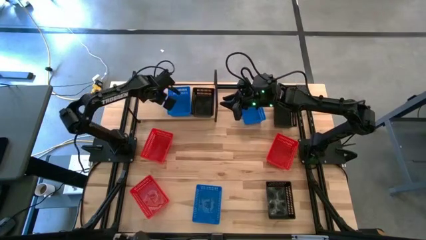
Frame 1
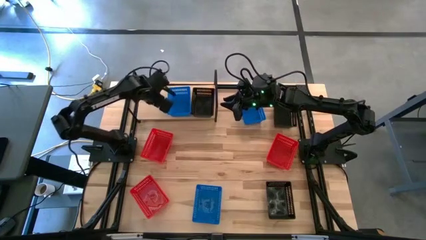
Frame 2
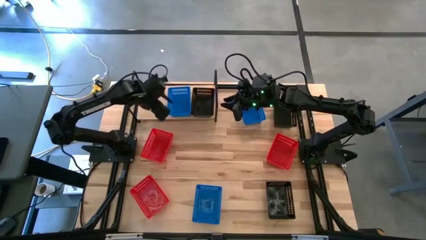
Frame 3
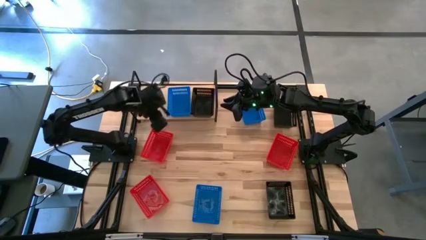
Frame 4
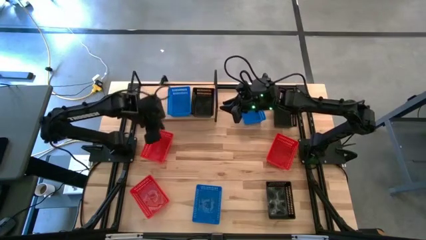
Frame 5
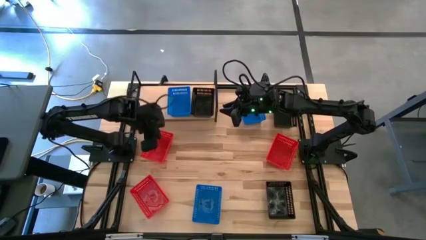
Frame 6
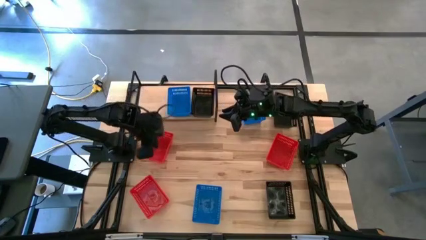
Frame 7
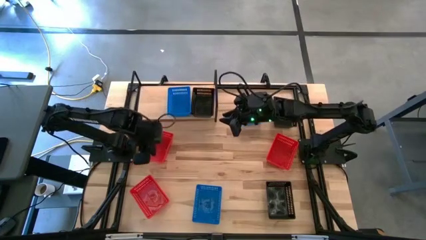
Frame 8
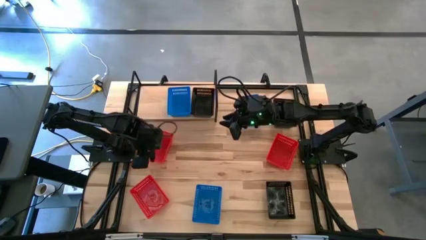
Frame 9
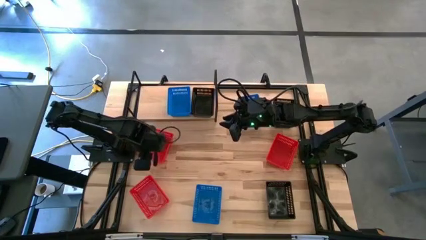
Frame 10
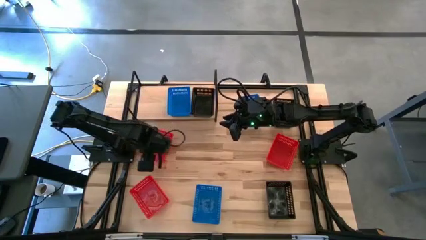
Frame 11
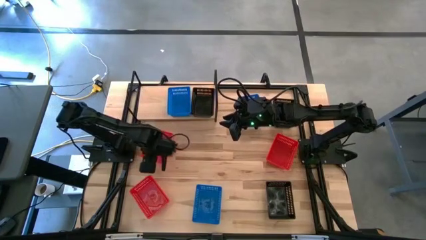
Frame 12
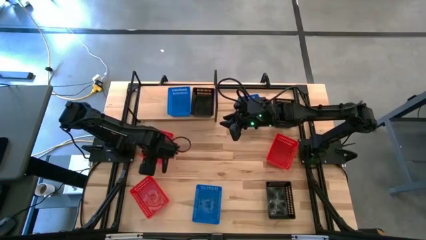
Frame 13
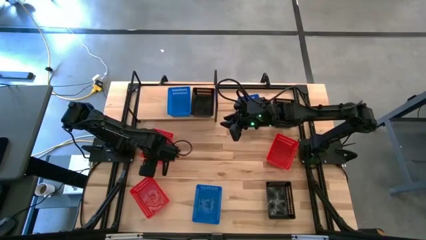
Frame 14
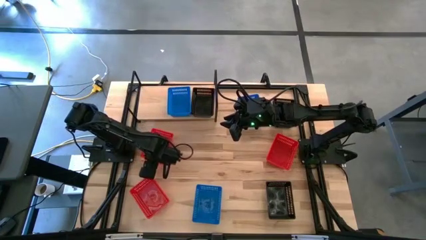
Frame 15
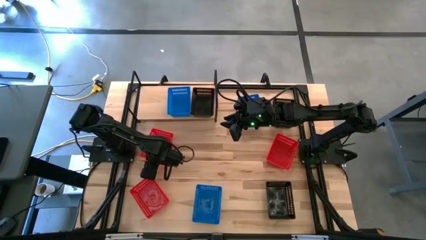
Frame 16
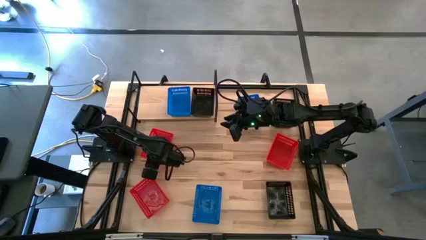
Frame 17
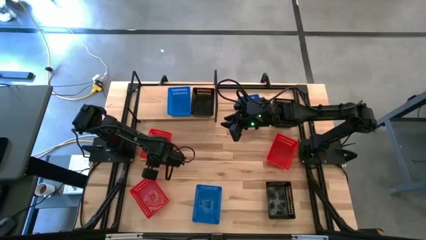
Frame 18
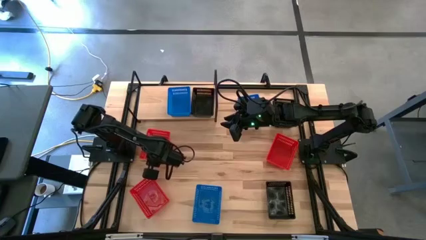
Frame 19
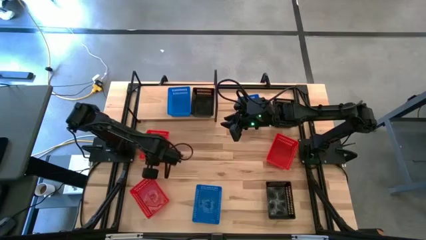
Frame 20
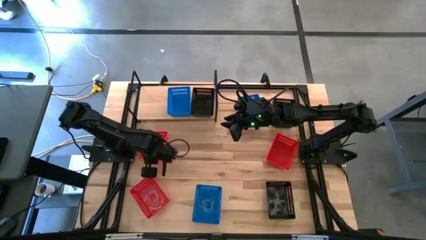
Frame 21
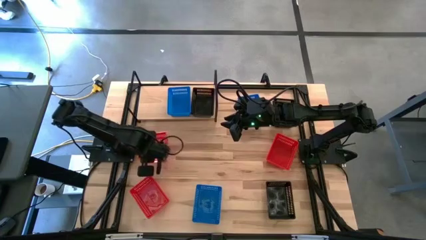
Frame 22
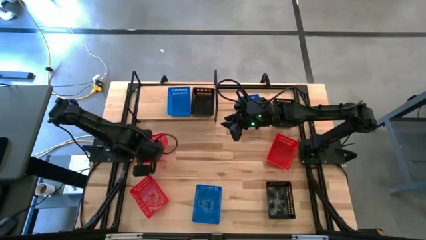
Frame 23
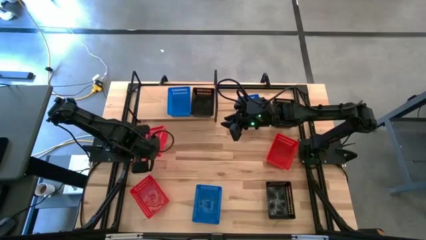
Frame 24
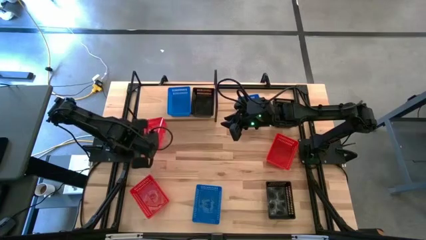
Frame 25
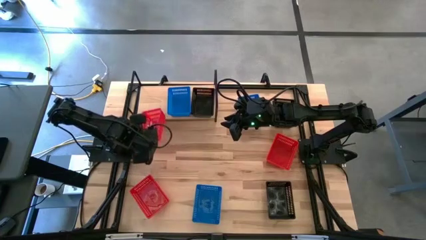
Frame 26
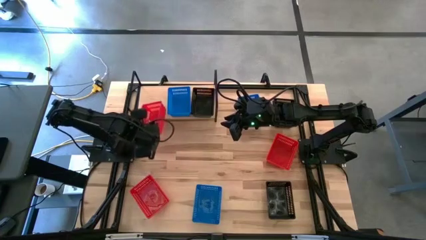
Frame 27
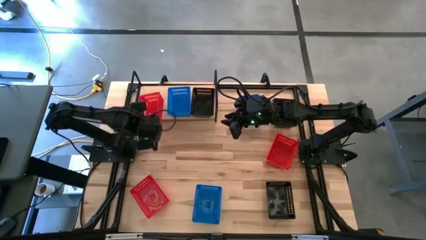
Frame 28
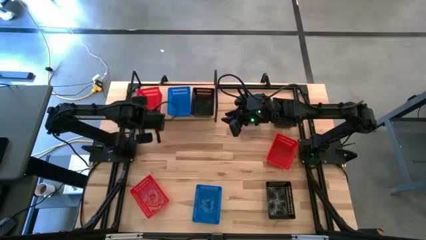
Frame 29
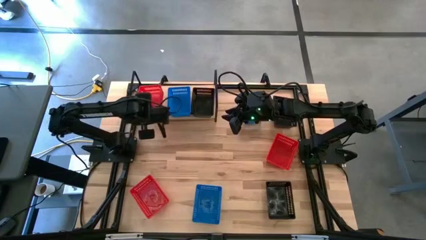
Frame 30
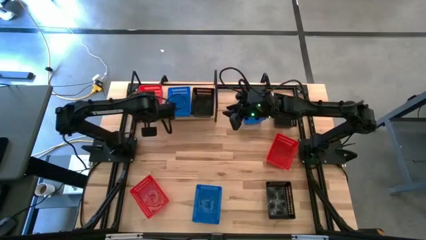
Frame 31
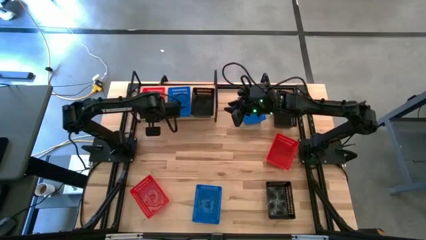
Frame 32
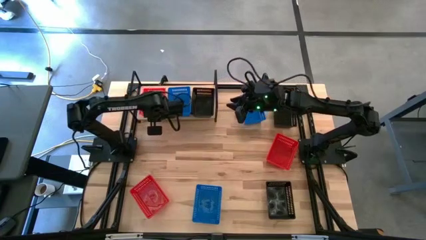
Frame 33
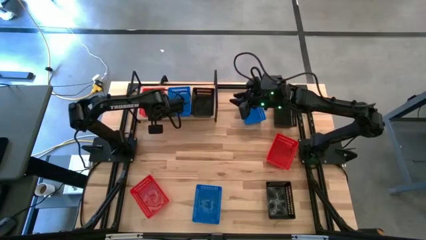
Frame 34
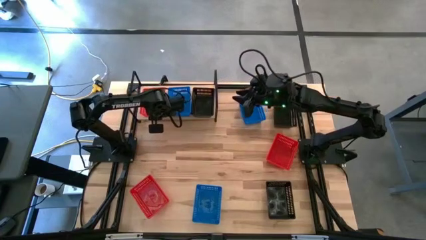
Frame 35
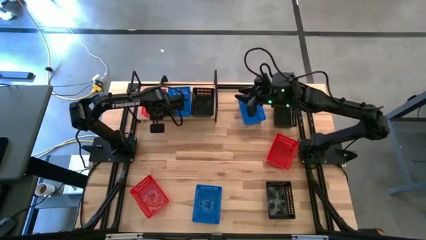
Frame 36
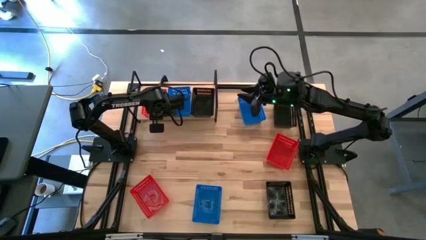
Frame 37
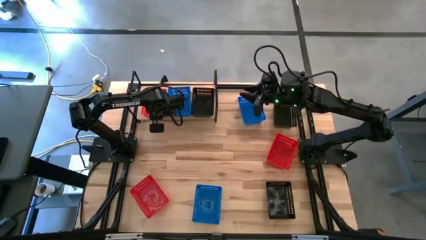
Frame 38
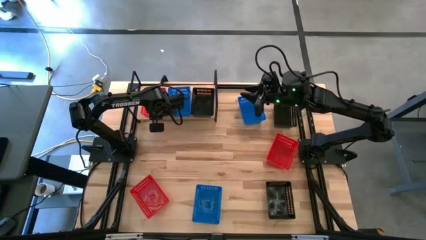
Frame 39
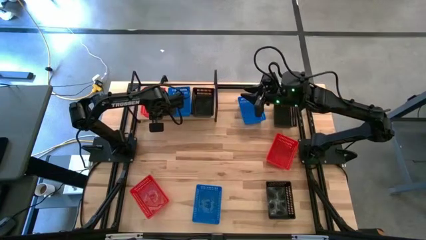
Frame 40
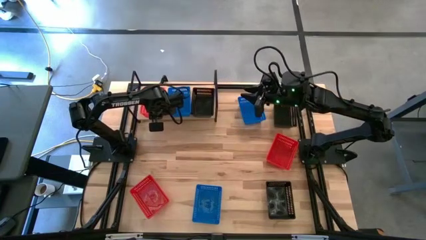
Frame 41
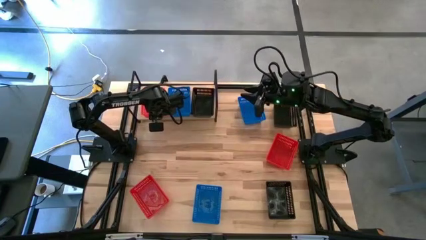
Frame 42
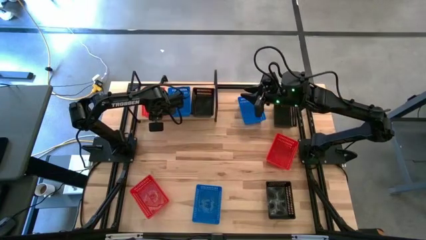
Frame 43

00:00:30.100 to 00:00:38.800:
Task: Stack baskets on shelf by color
Put the top left red bin on the shelf
